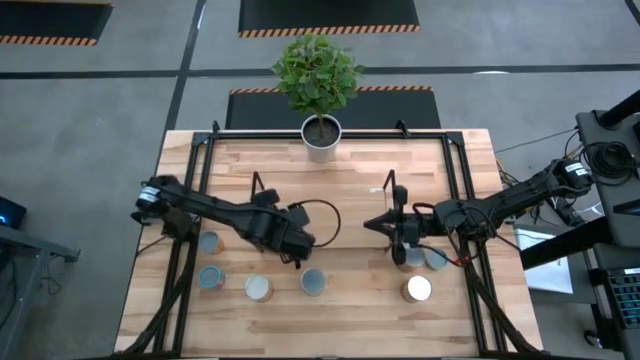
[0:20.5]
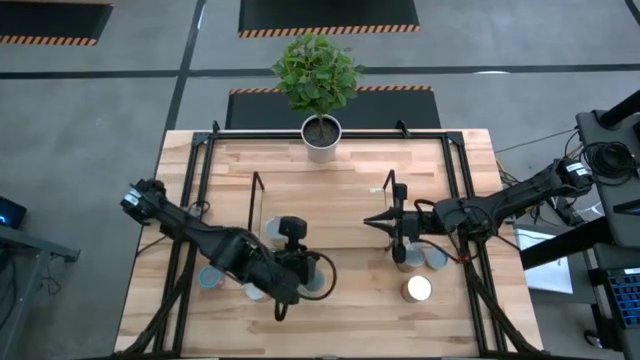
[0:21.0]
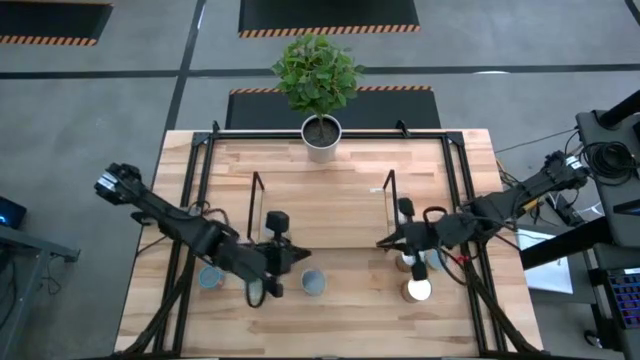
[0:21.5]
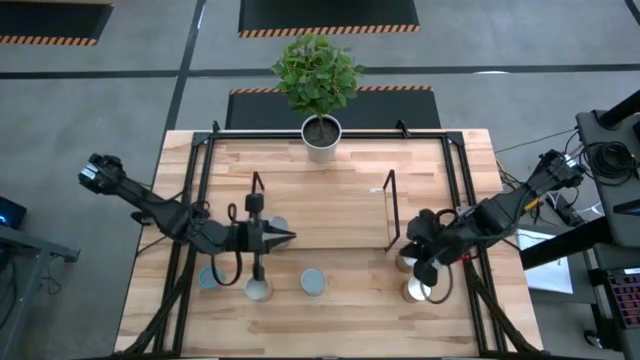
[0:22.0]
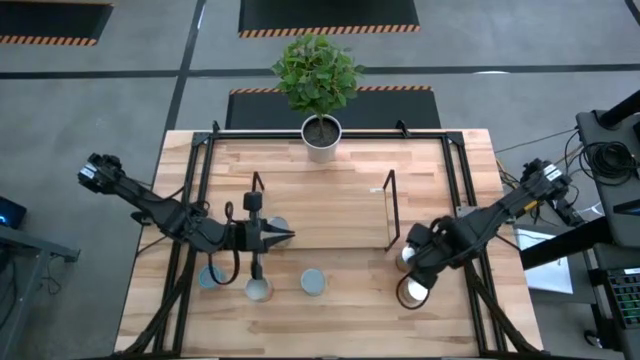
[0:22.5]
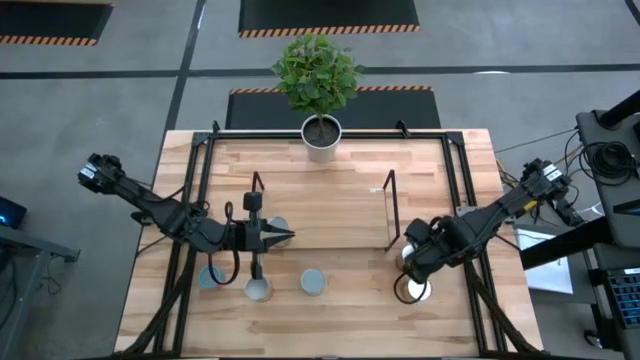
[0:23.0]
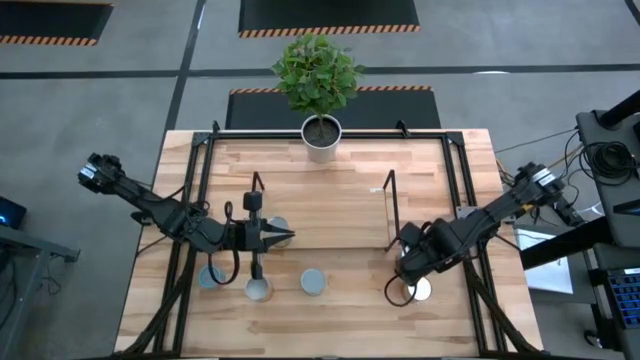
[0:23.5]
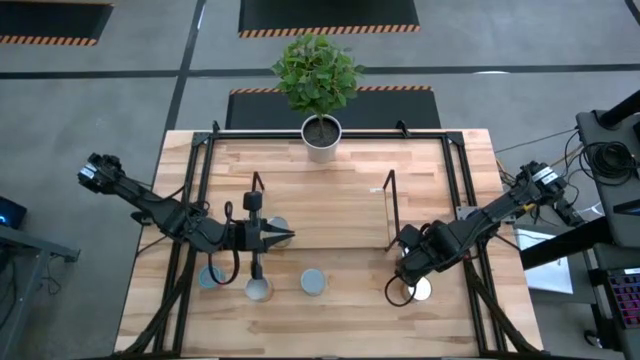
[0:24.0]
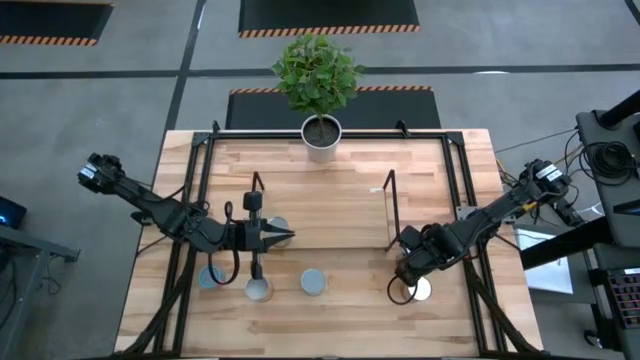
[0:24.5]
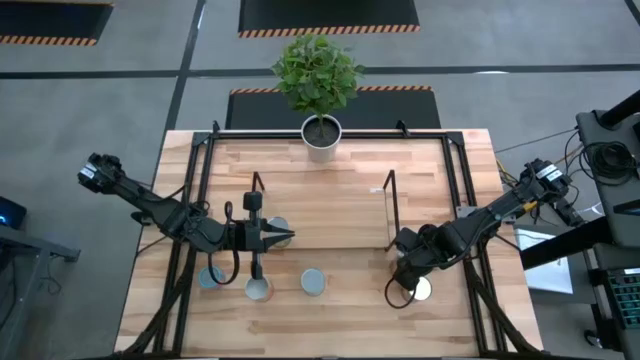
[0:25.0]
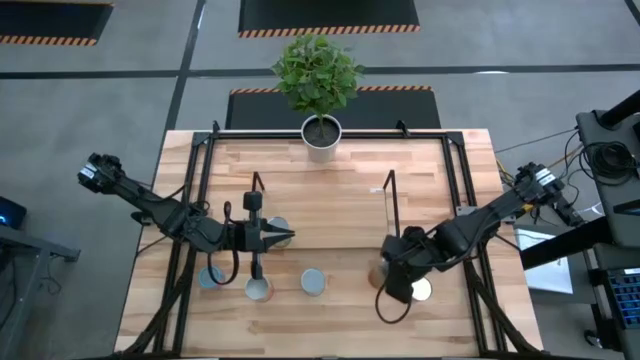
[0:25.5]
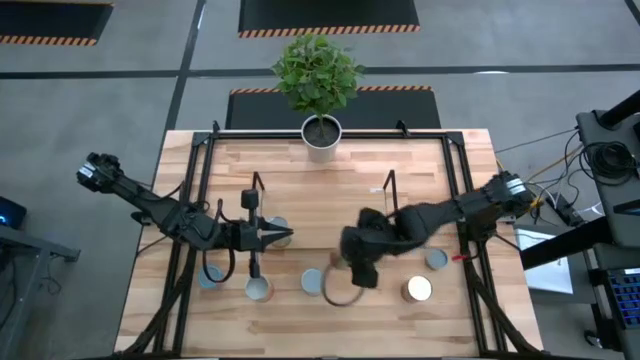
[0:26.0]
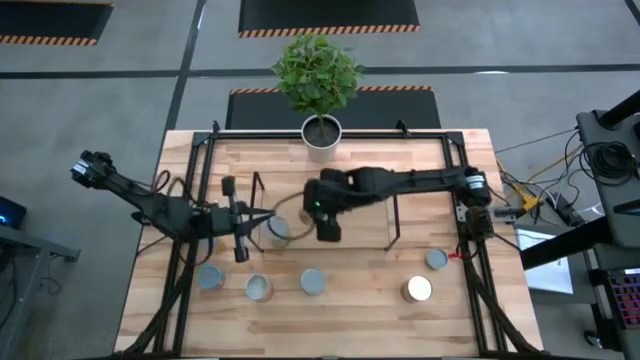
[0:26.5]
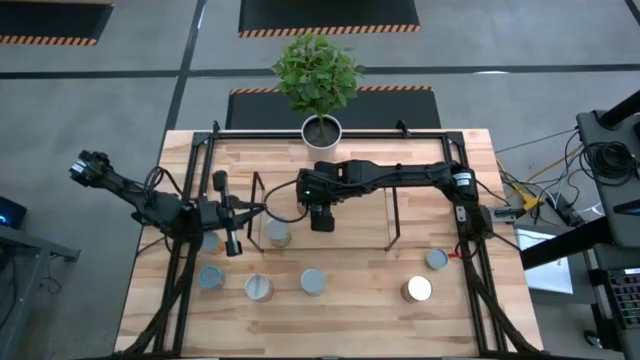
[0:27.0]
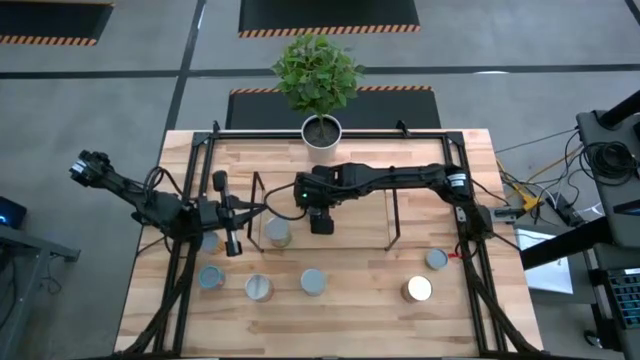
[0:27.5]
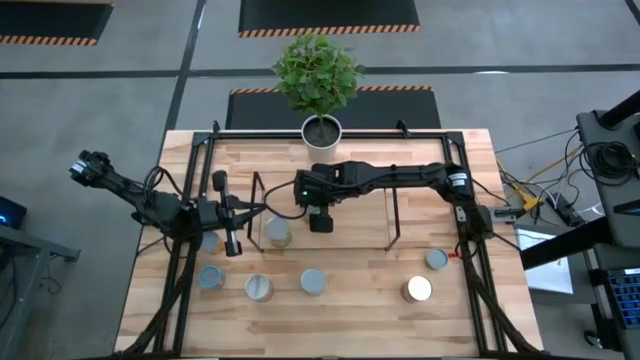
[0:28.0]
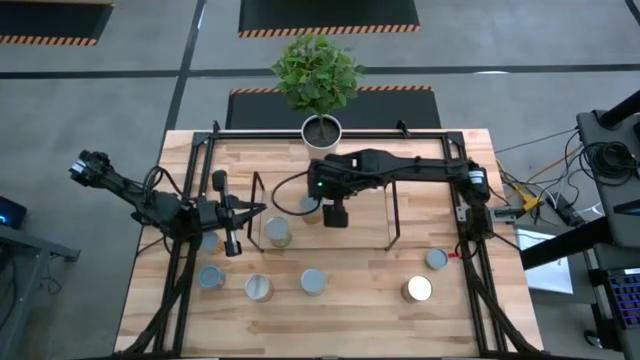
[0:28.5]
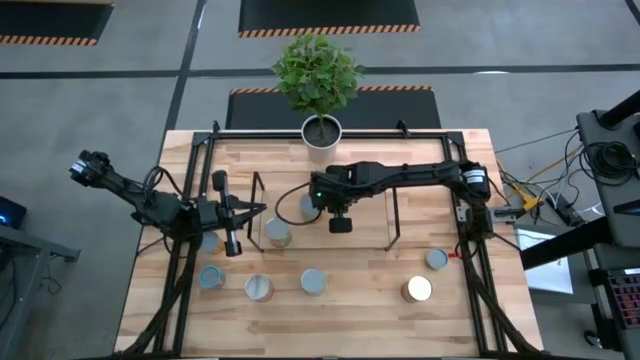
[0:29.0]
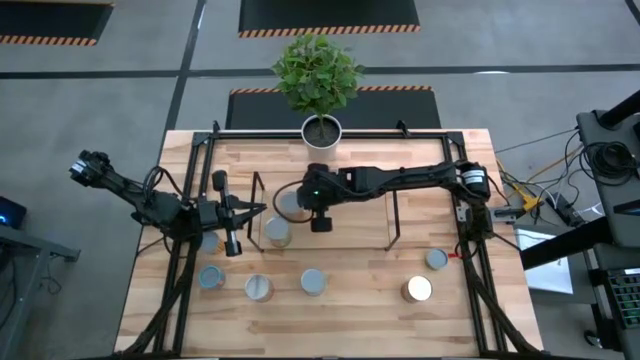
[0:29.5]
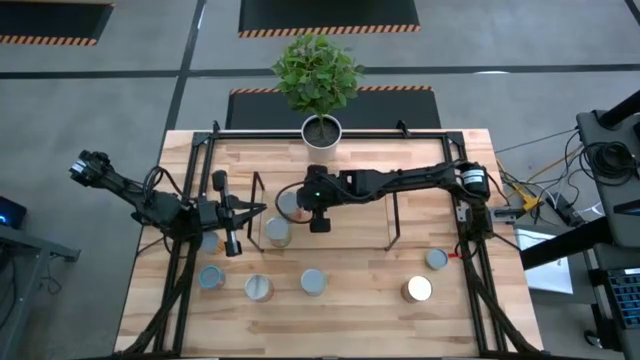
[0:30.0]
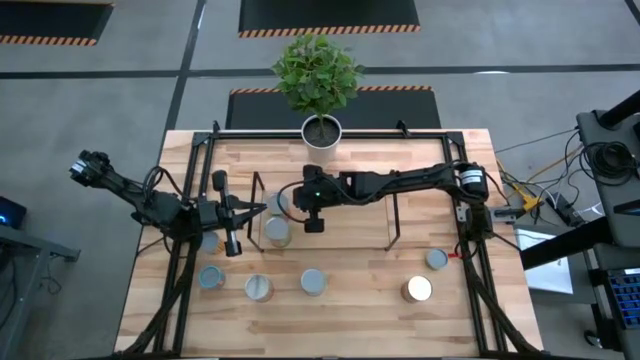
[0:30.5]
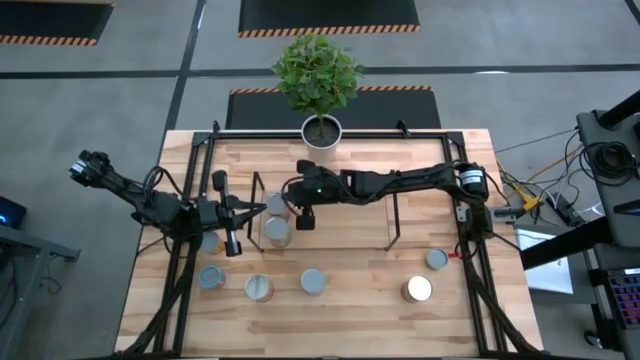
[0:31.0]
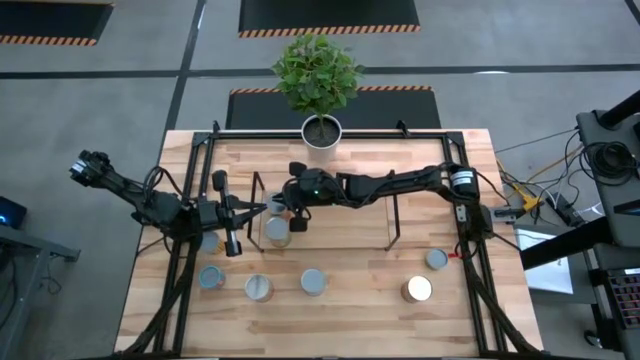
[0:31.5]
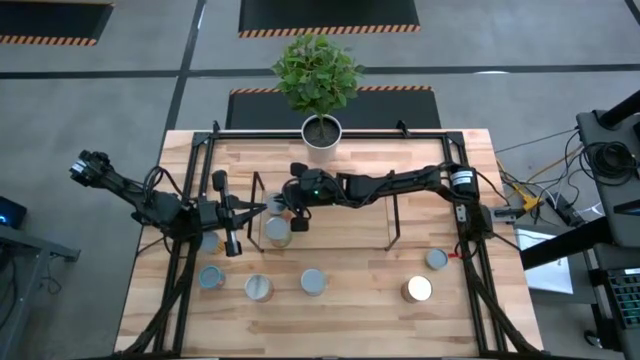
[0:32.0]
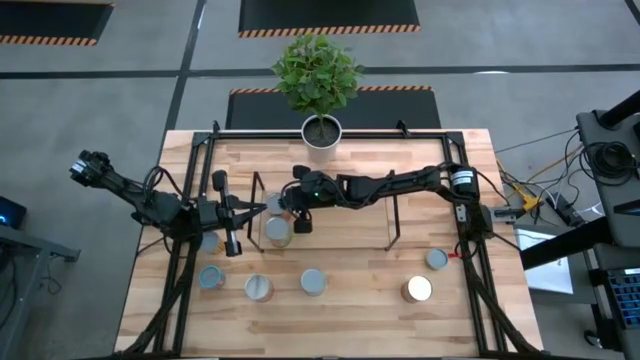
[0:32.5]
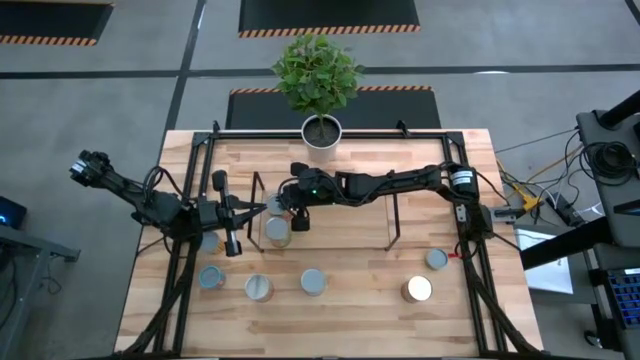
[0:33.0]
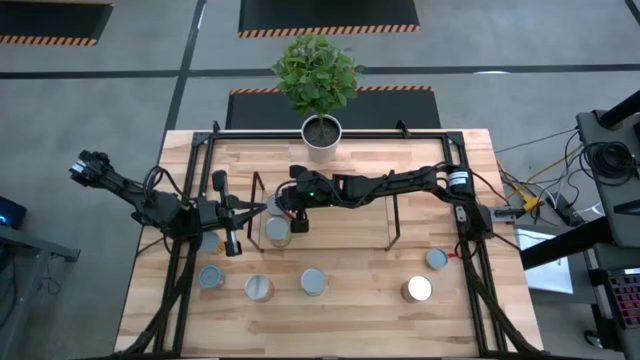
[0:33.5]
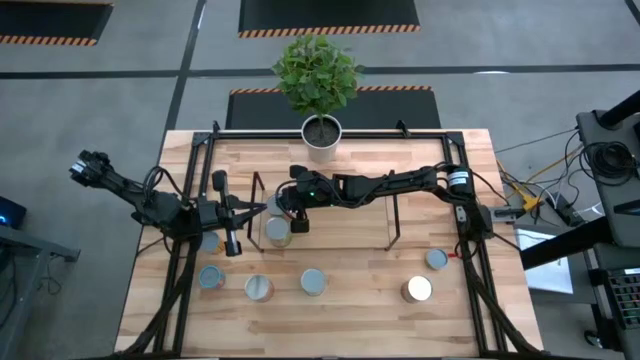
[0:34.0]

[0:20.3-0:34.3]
Task: Pick and place cans onto a shelf
Put the canned green beans on the shelf

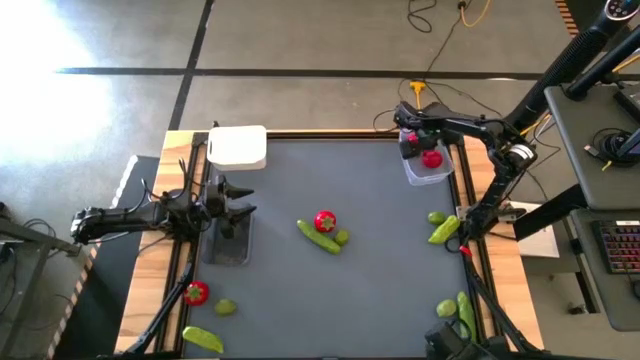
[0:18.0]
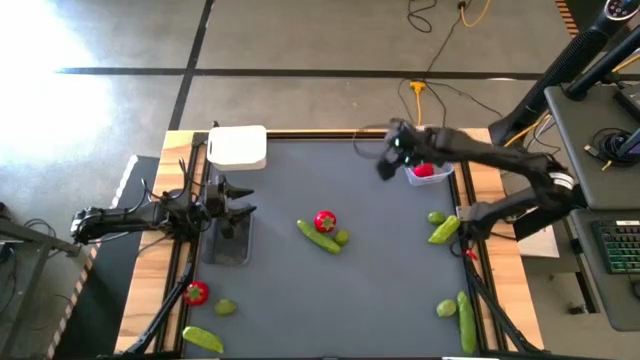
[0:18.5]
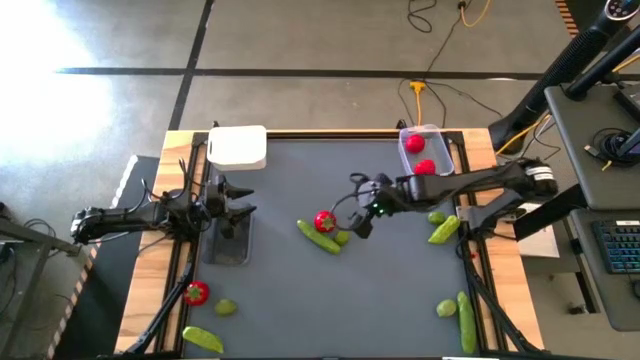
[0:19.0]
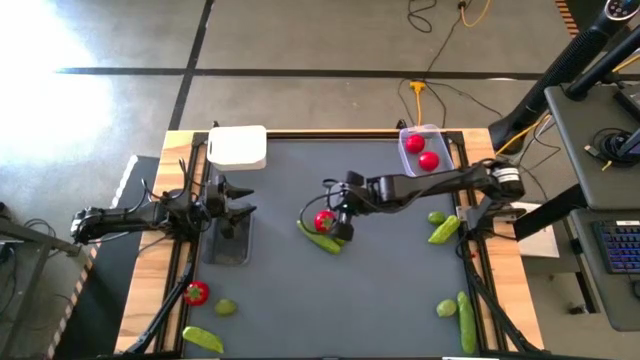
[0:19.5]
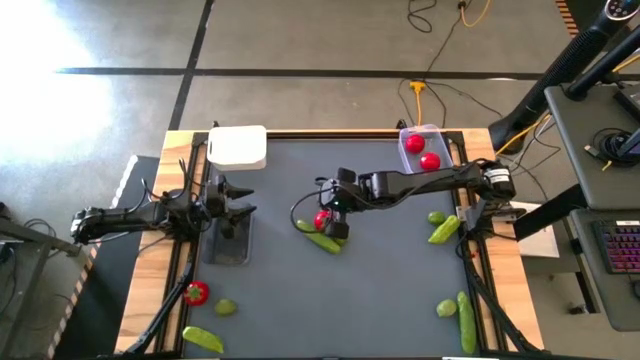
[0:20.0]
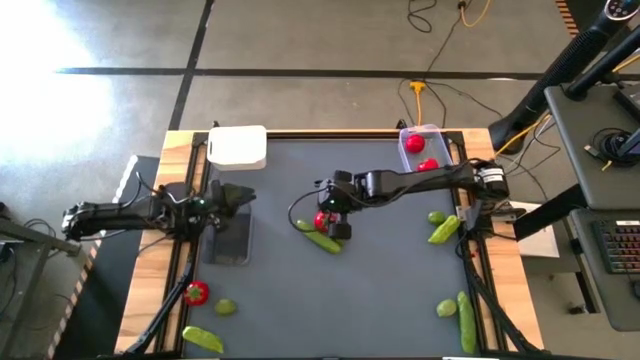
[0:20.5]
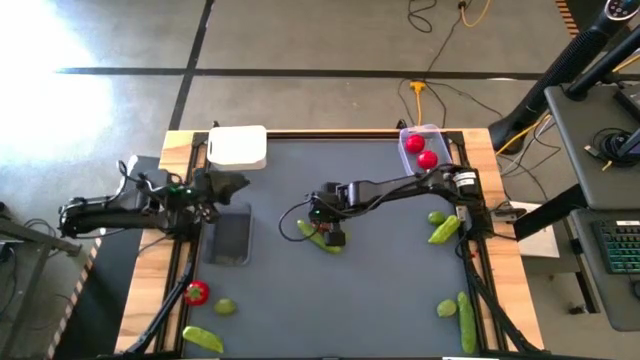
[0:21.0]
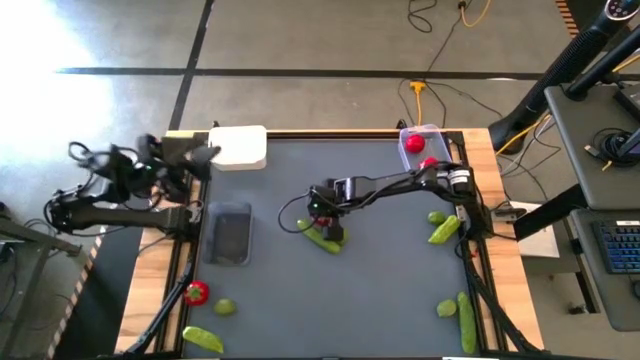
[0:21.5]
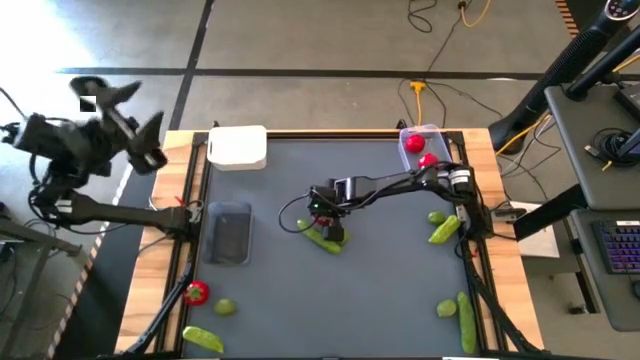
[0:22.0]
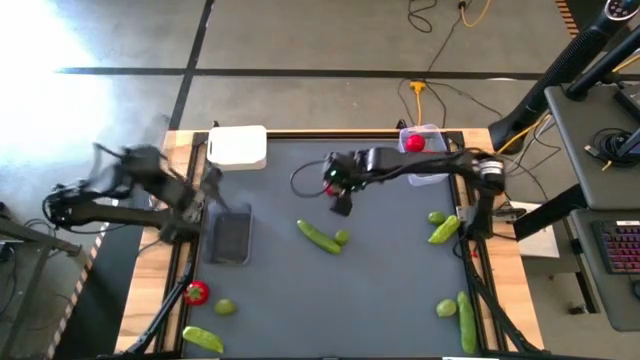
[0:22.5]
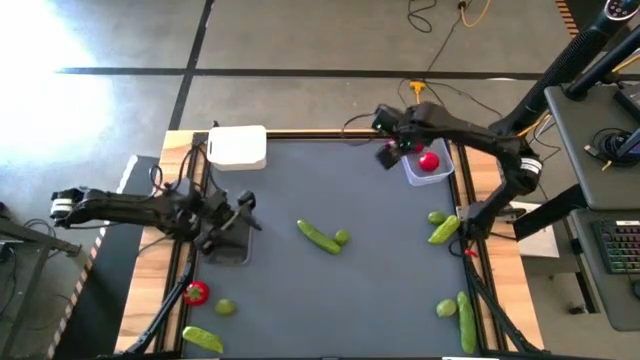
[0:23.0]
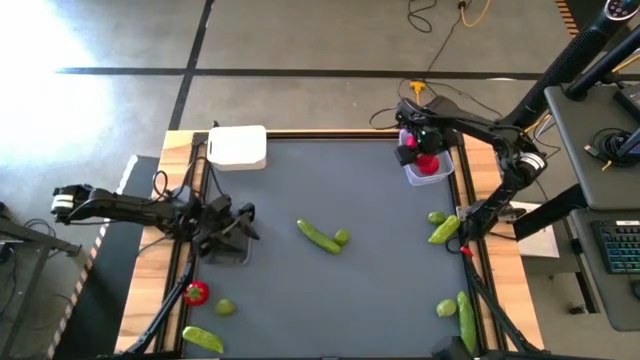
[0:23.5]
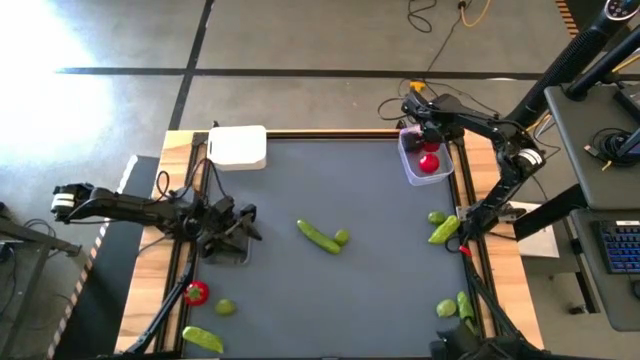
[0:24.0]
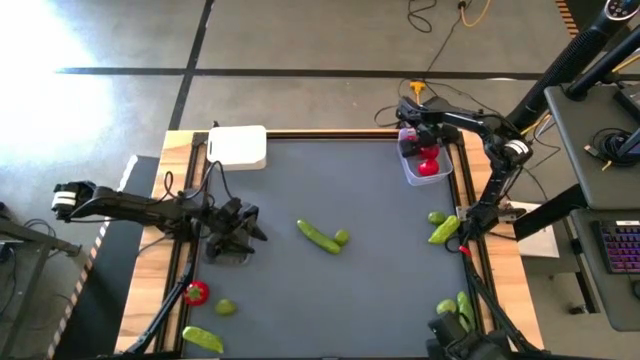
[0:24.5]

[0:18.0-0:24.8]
Task: Sort produce into baskets
Put the red tomato into the transparent bin
